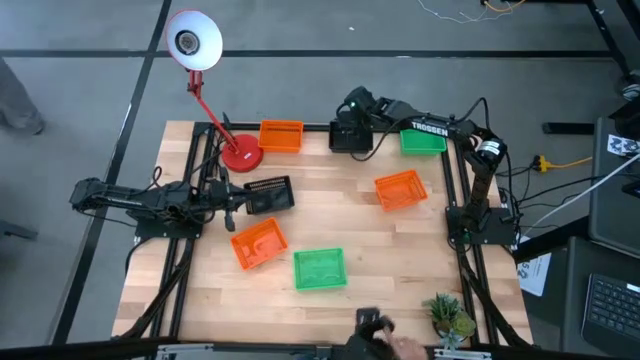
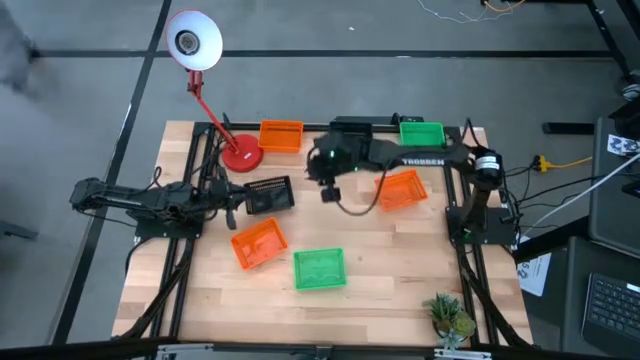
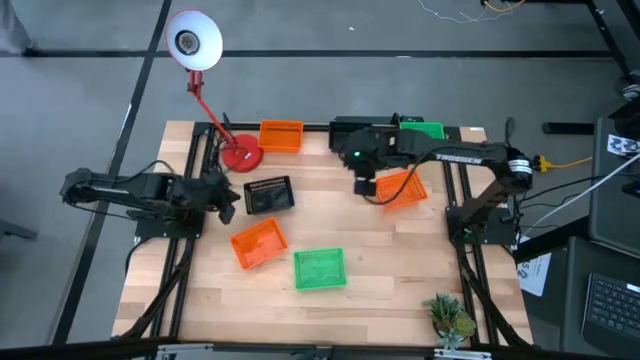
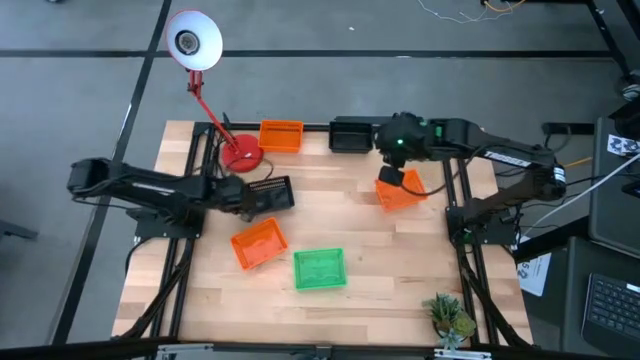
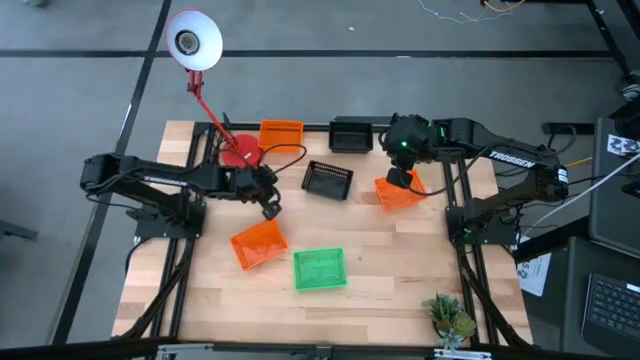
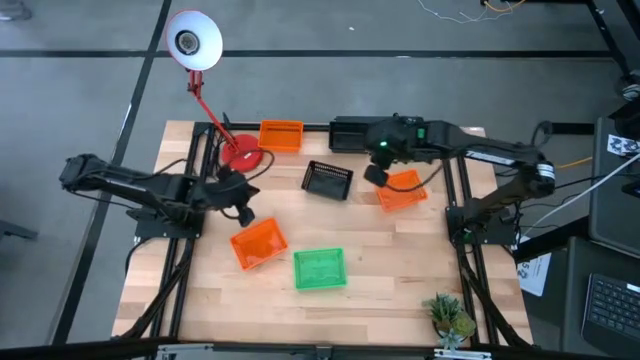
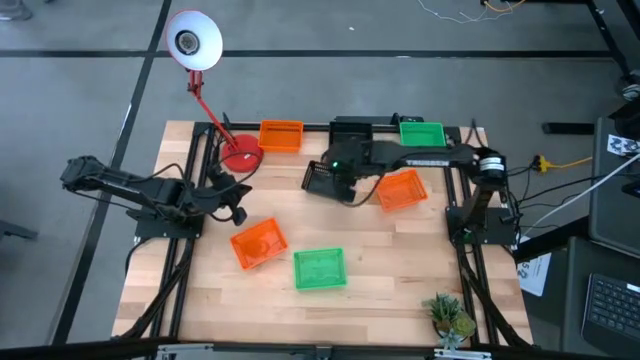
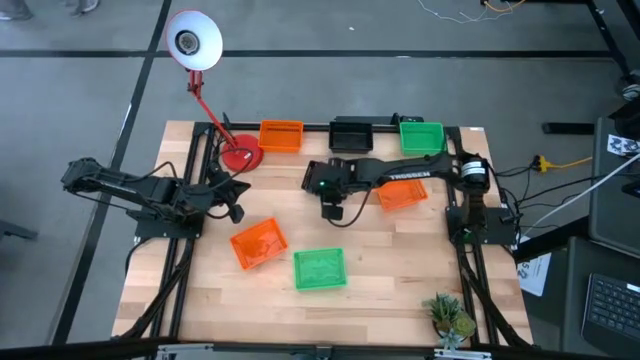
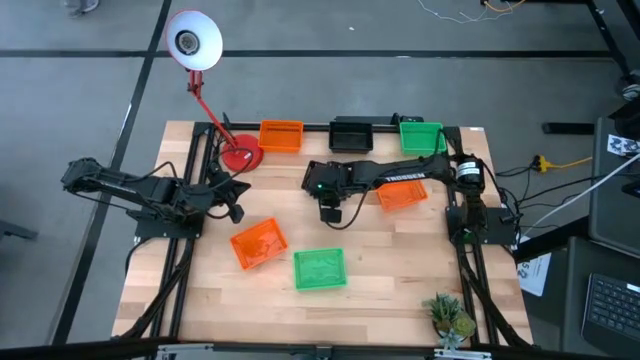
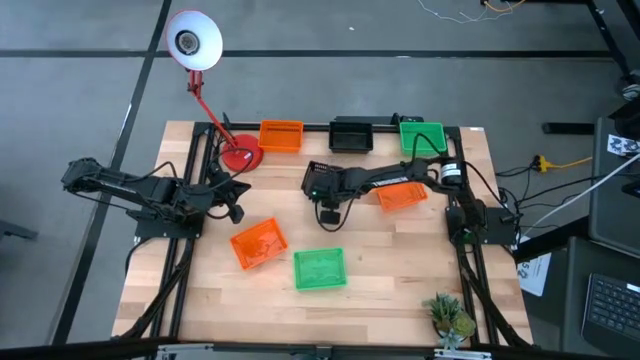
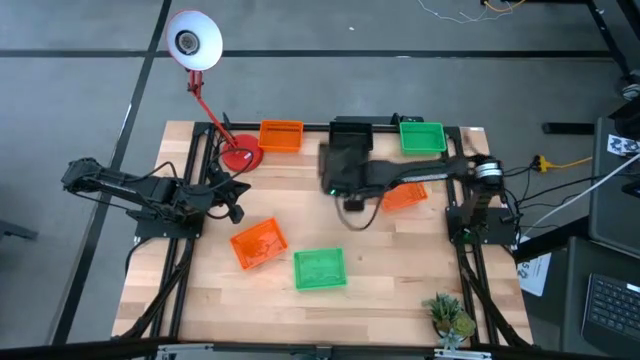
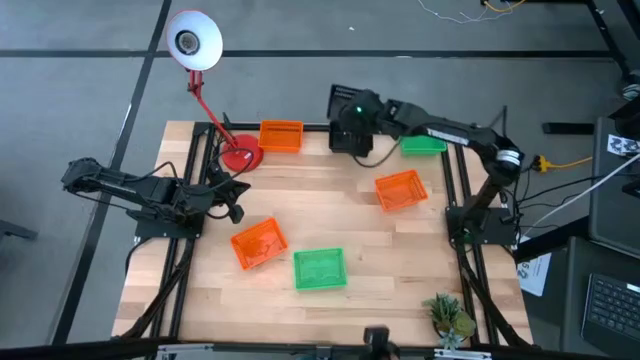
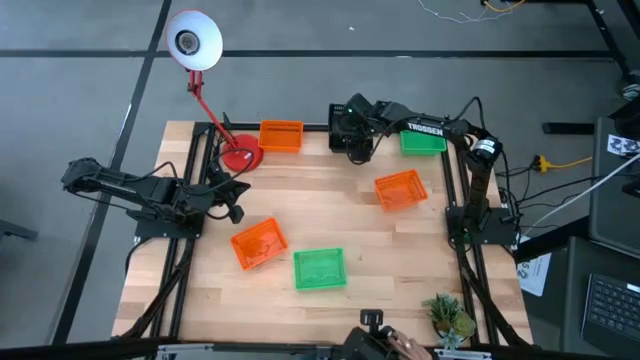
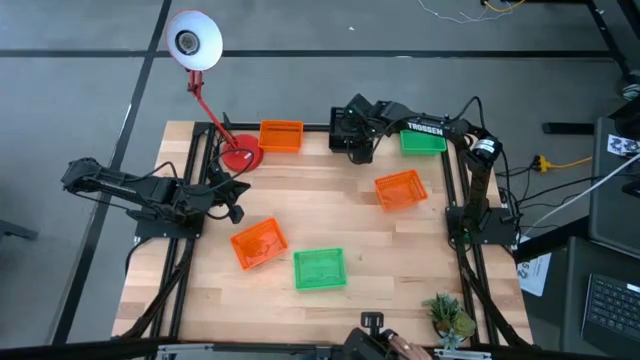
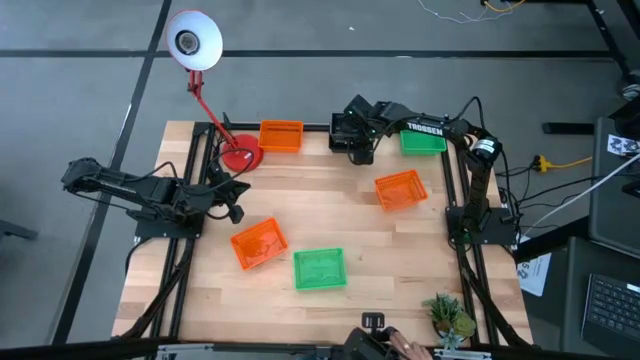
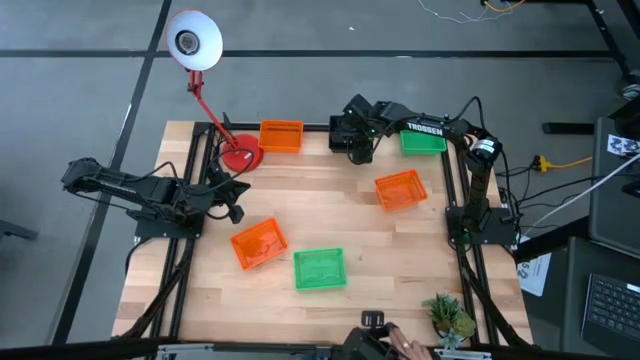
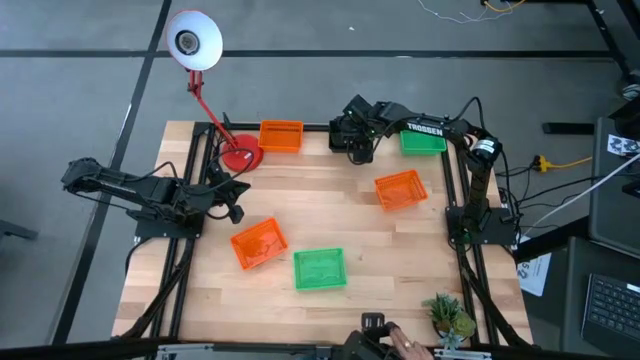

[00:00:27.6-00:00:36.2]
Stack the bottom black bin on top of the stacked black bin

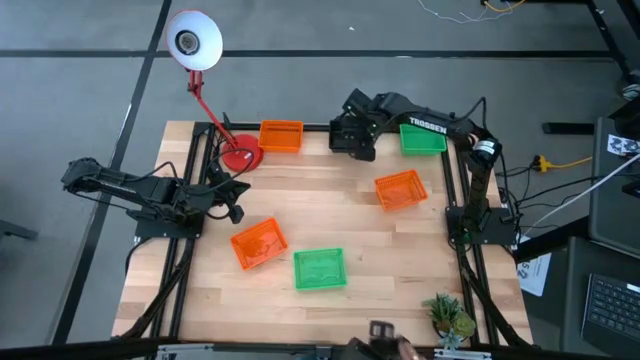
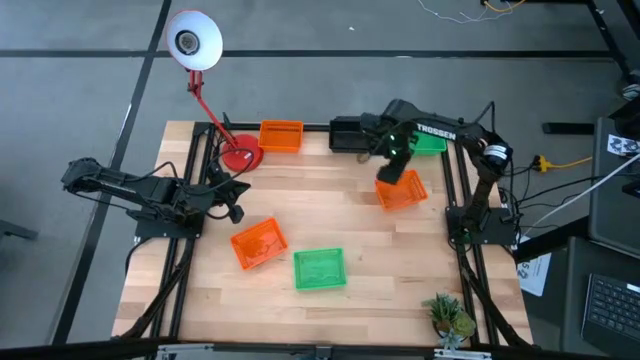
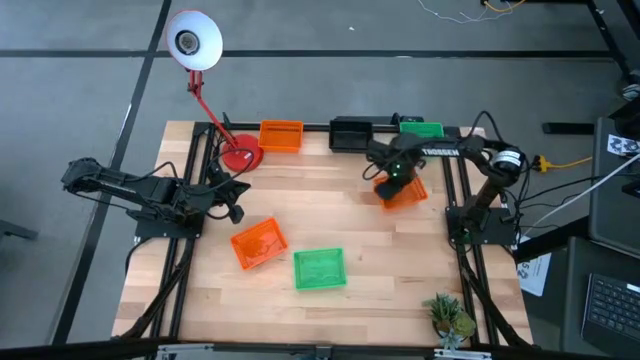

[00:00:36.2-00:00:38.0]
Move the right orange bin to the top left of the table

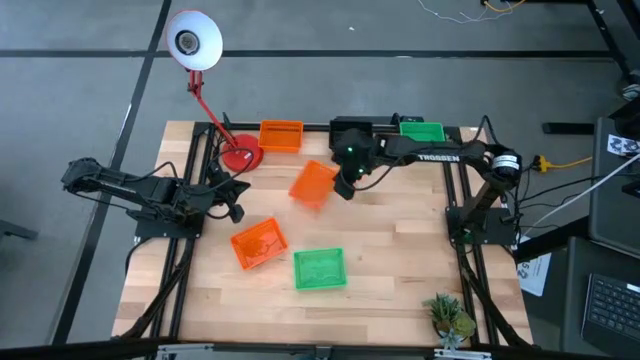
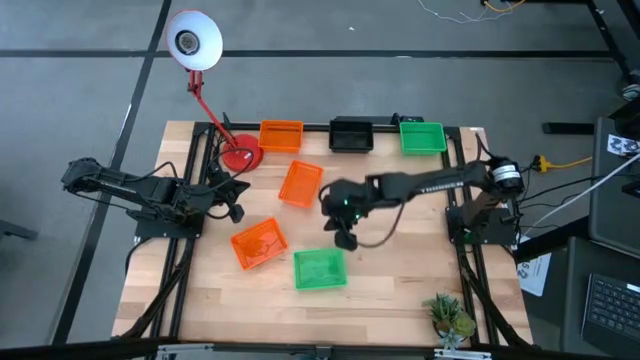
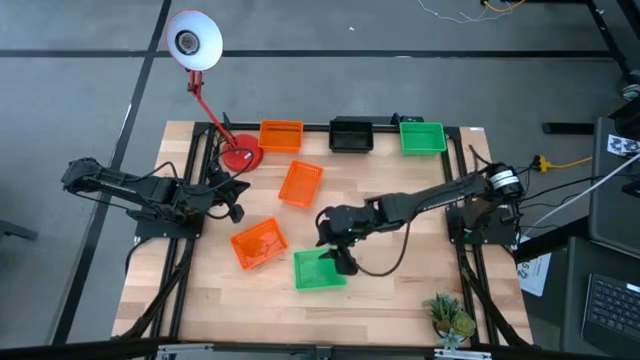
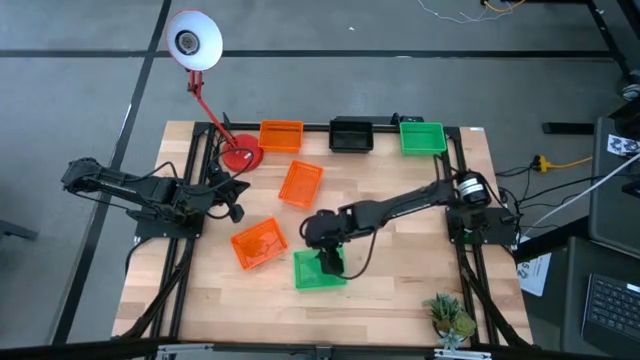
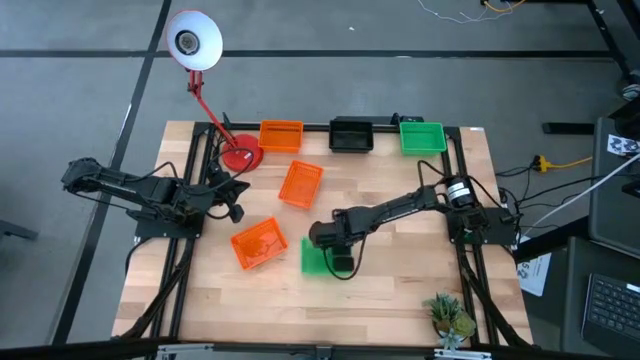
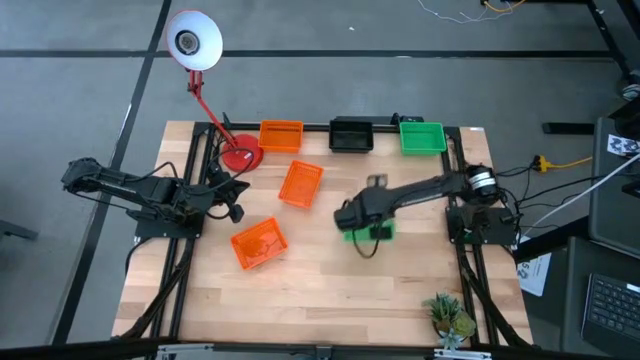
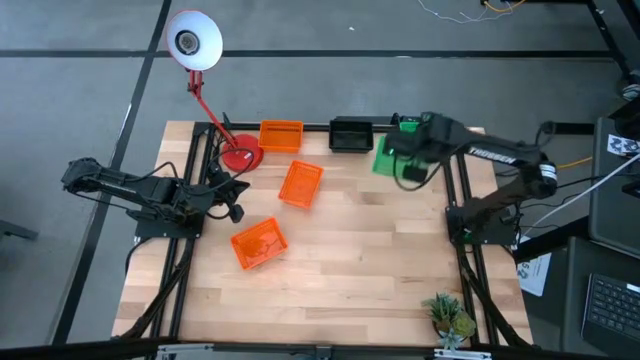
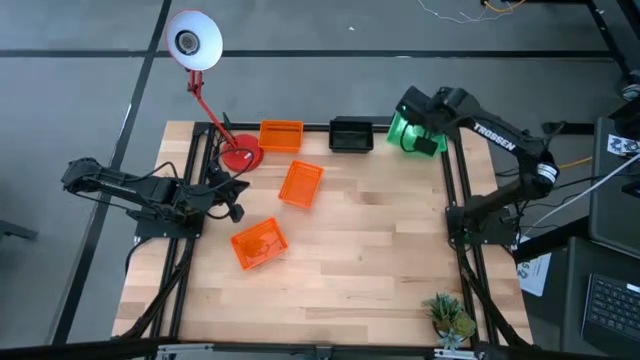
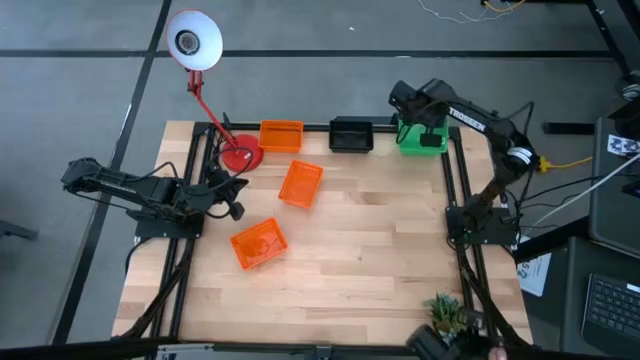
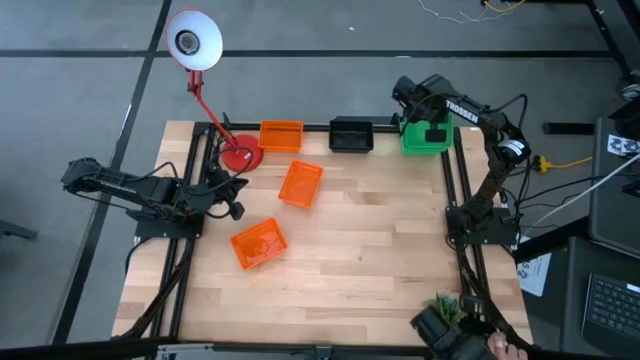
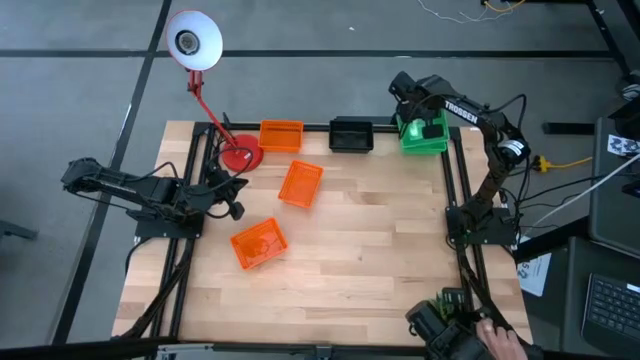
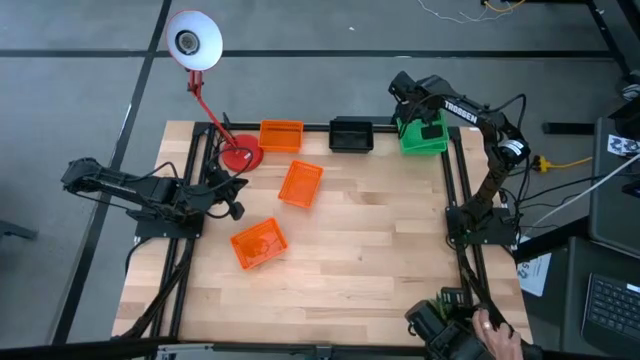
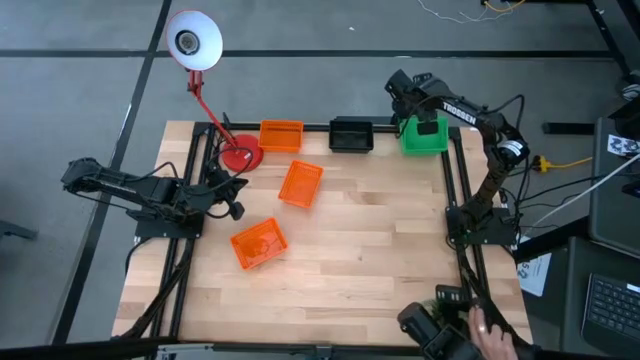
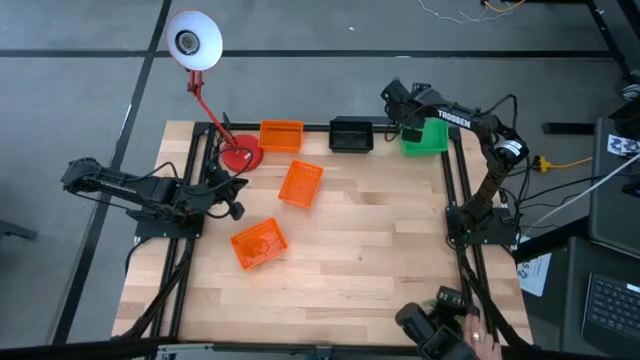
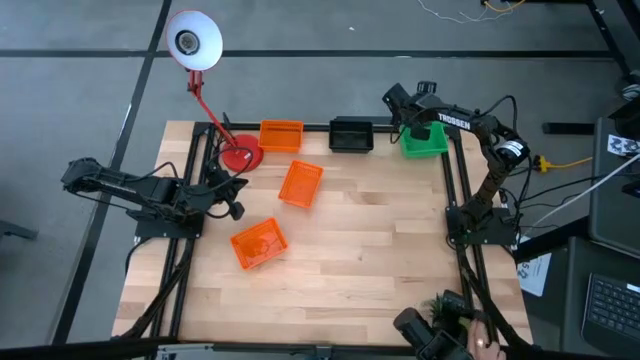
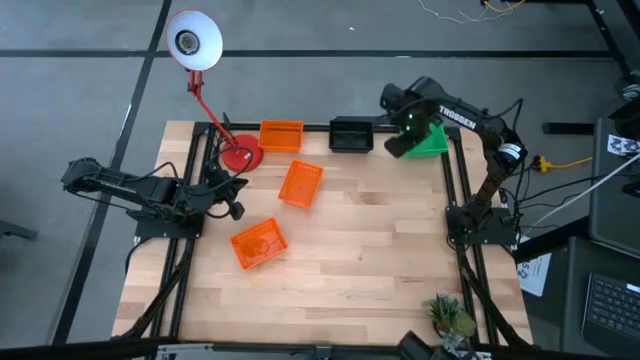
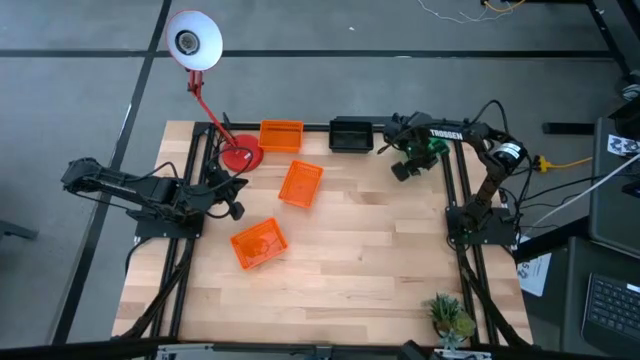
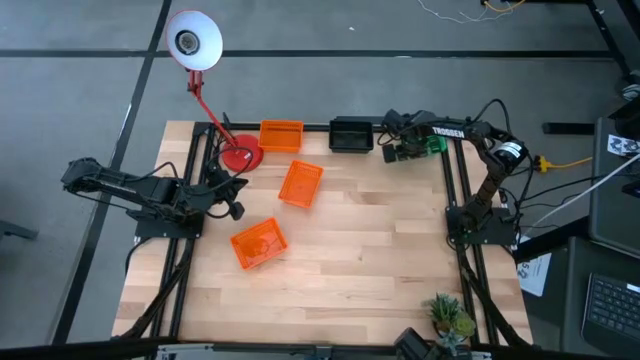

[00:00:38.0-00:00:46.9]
Stack the bottom green bin on top of the stacked green bin
